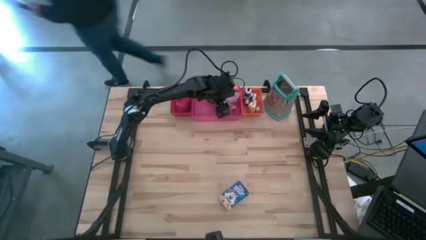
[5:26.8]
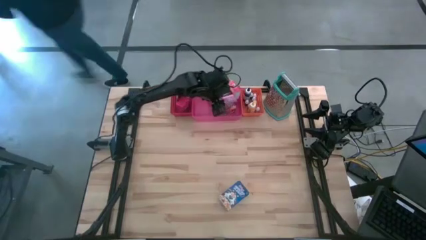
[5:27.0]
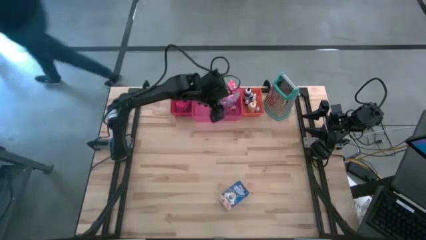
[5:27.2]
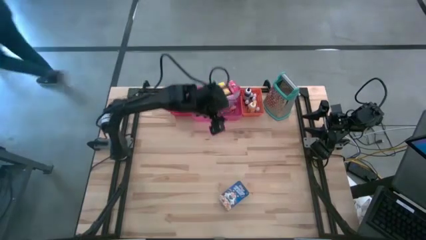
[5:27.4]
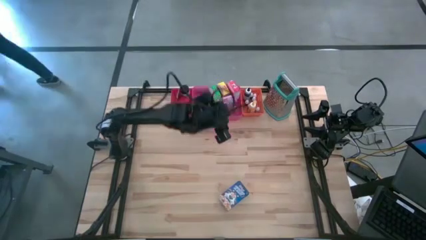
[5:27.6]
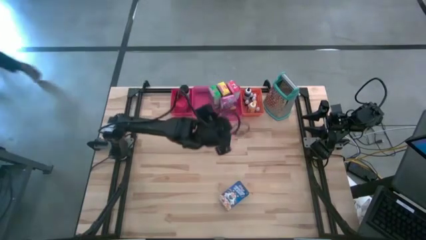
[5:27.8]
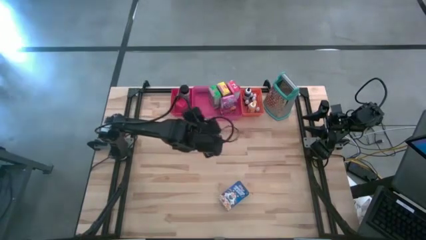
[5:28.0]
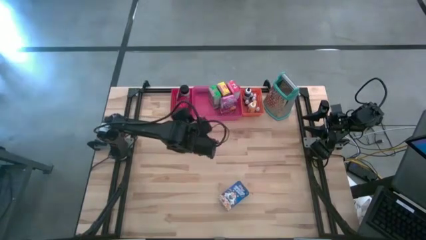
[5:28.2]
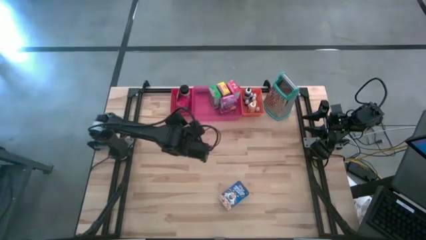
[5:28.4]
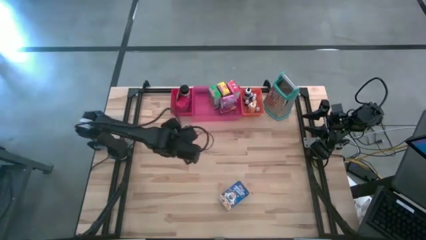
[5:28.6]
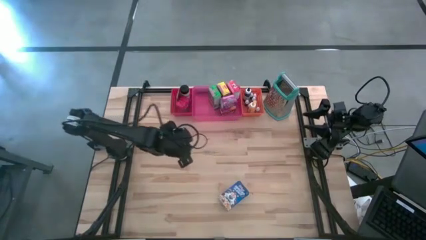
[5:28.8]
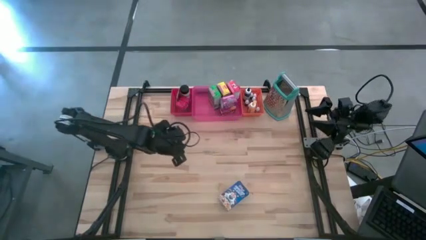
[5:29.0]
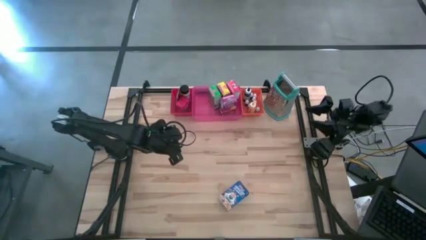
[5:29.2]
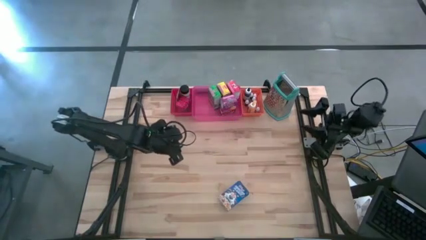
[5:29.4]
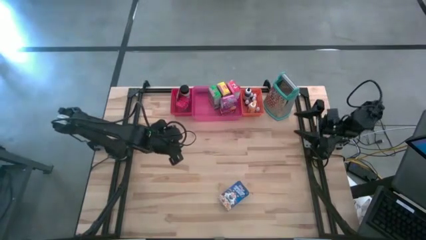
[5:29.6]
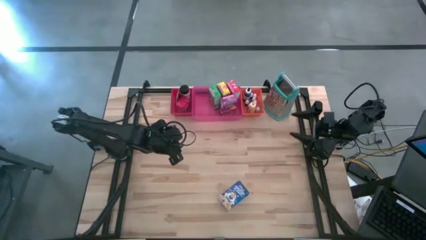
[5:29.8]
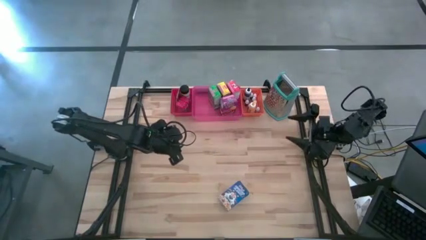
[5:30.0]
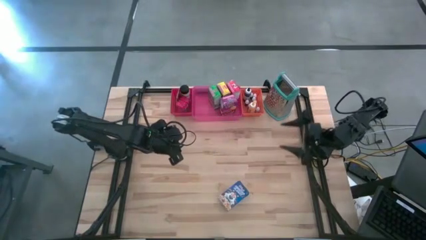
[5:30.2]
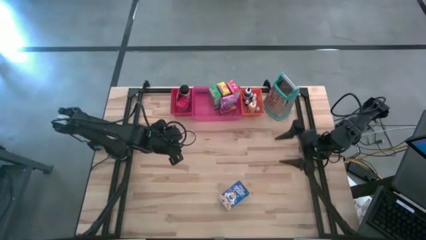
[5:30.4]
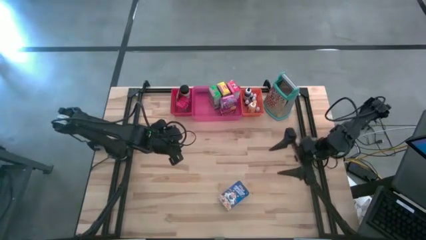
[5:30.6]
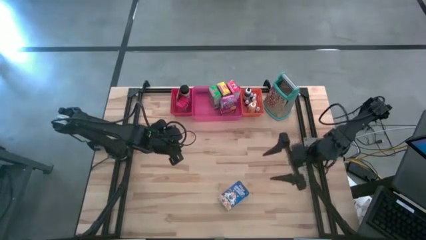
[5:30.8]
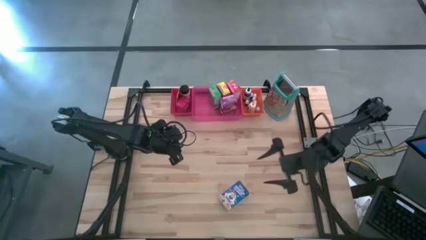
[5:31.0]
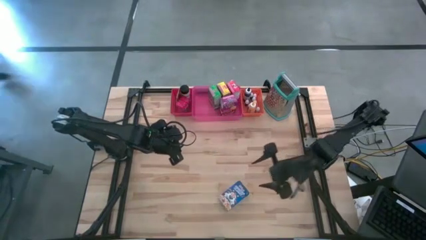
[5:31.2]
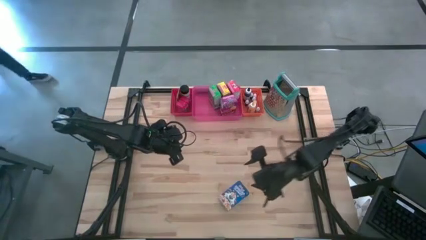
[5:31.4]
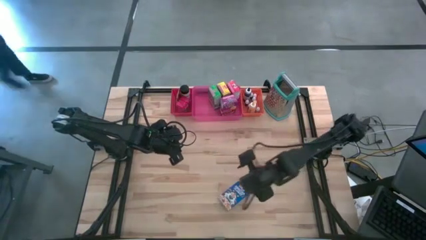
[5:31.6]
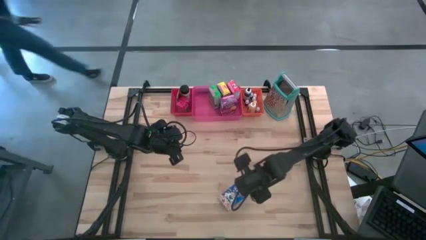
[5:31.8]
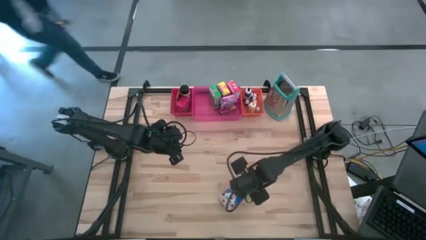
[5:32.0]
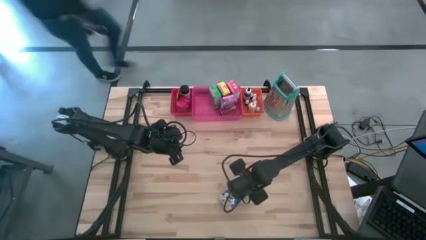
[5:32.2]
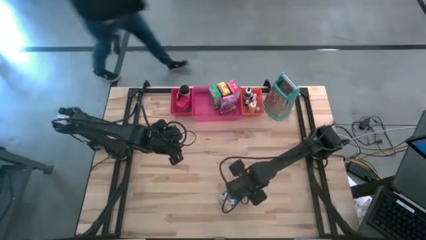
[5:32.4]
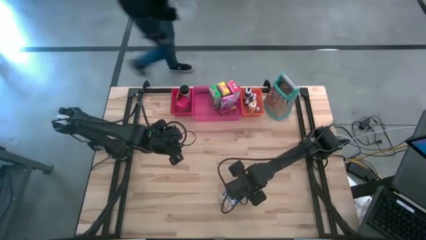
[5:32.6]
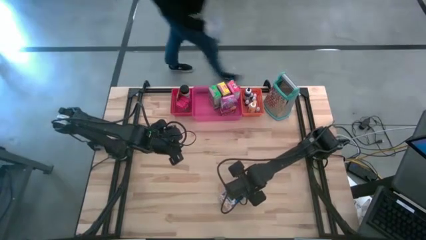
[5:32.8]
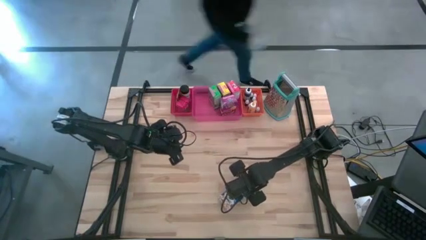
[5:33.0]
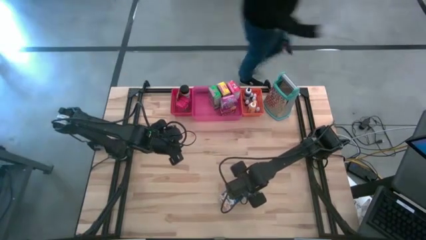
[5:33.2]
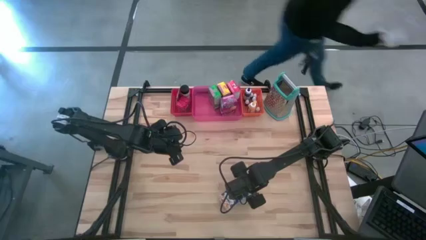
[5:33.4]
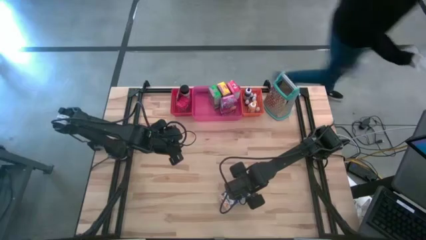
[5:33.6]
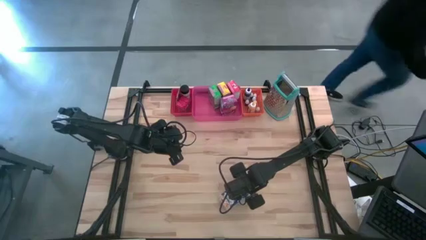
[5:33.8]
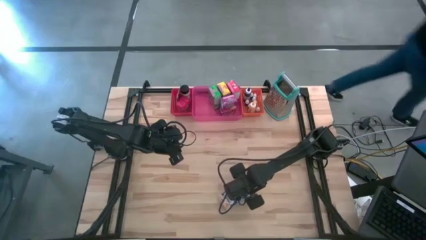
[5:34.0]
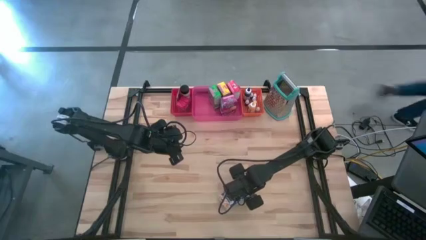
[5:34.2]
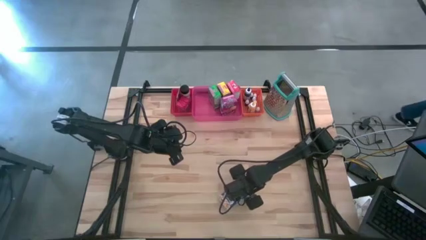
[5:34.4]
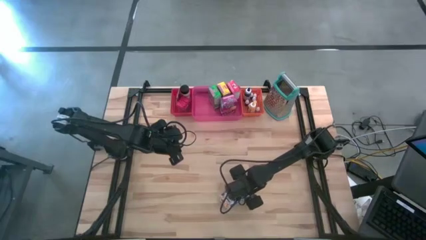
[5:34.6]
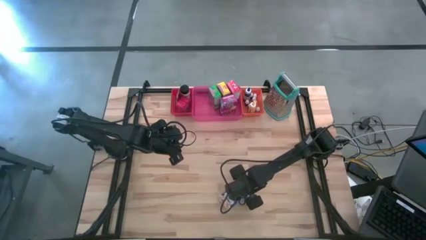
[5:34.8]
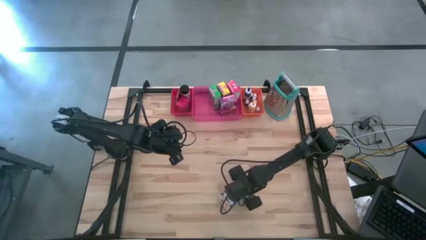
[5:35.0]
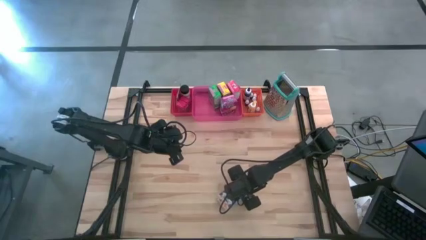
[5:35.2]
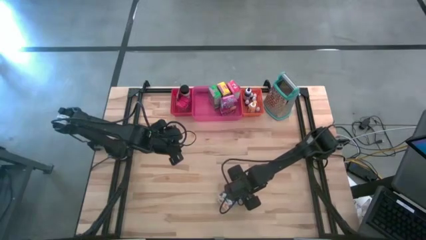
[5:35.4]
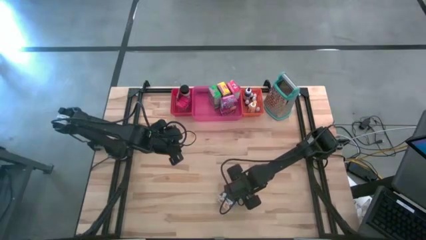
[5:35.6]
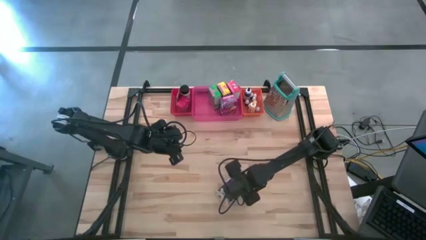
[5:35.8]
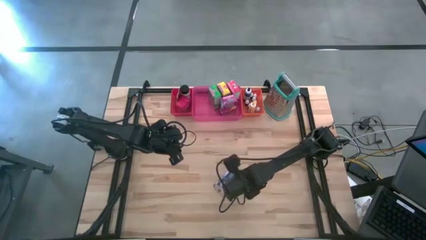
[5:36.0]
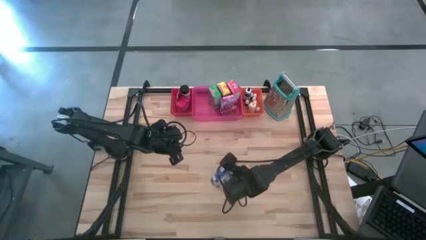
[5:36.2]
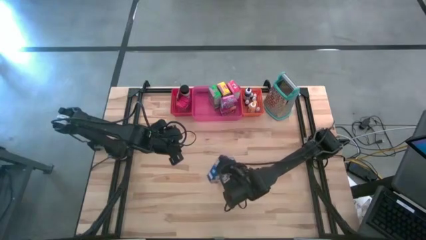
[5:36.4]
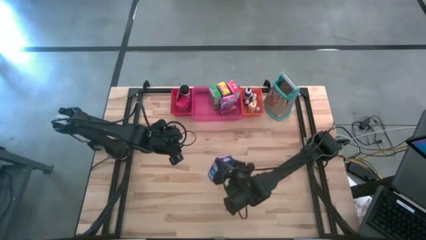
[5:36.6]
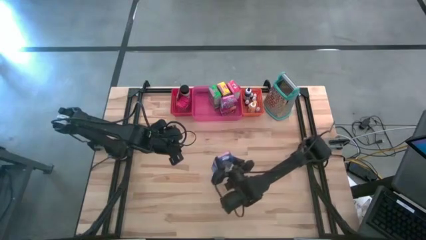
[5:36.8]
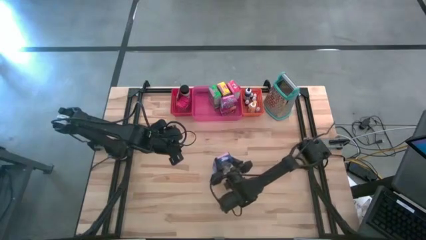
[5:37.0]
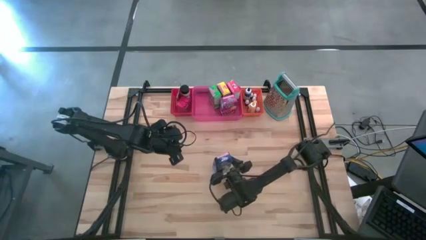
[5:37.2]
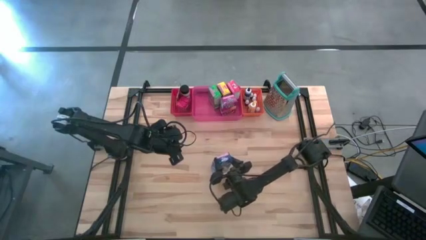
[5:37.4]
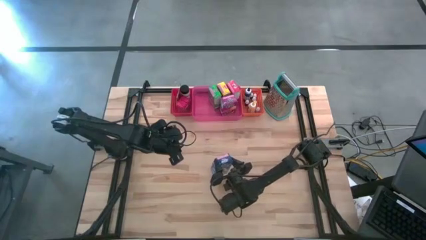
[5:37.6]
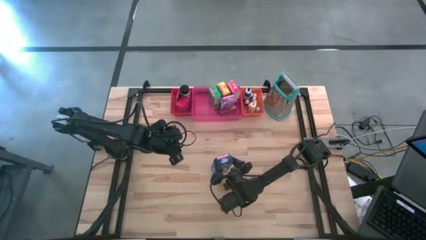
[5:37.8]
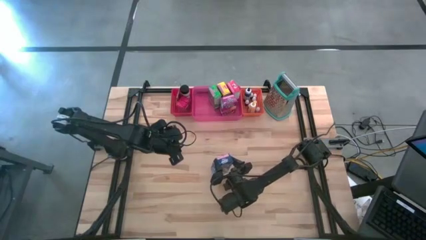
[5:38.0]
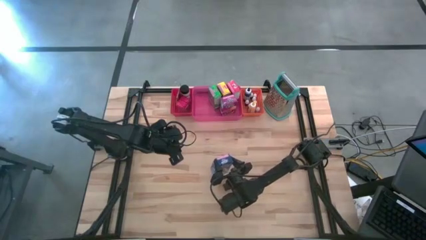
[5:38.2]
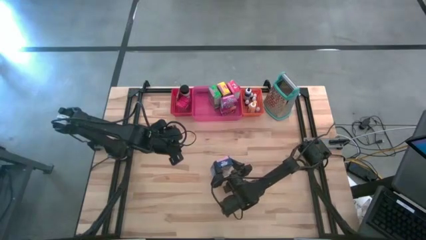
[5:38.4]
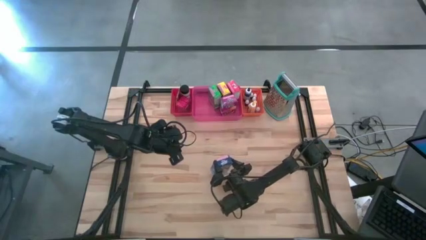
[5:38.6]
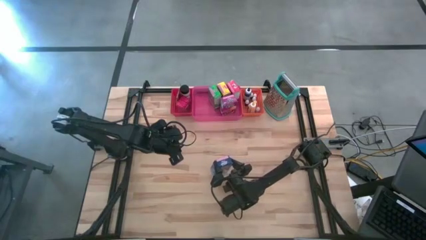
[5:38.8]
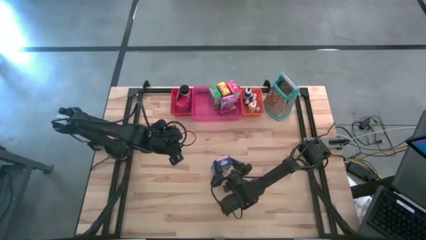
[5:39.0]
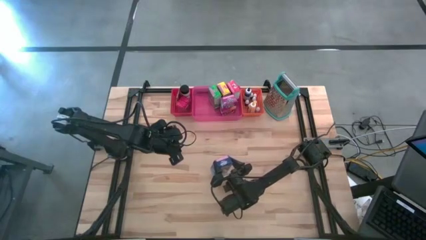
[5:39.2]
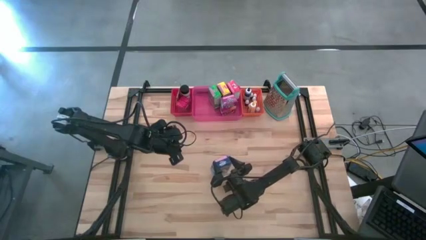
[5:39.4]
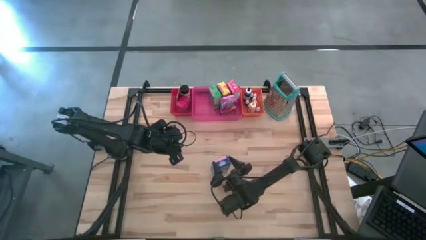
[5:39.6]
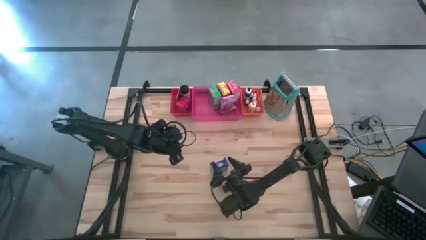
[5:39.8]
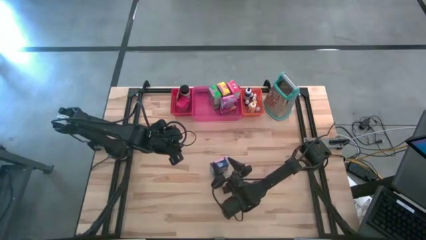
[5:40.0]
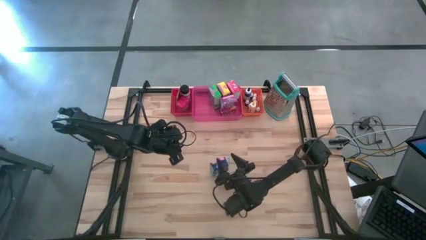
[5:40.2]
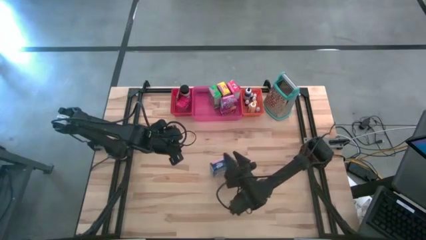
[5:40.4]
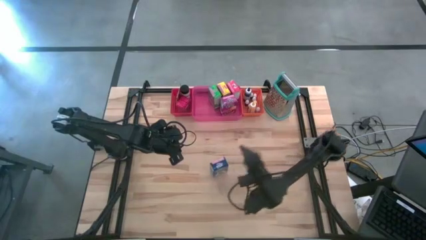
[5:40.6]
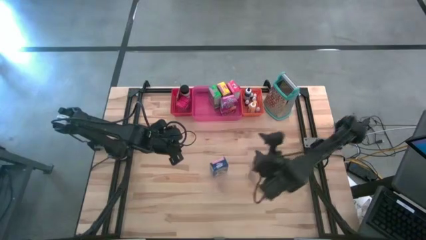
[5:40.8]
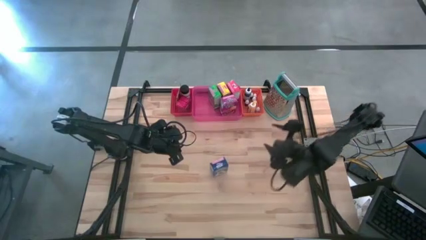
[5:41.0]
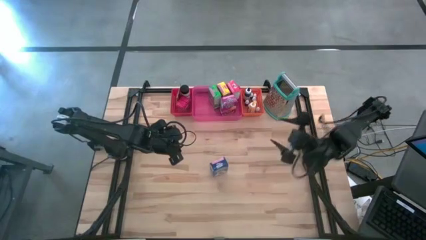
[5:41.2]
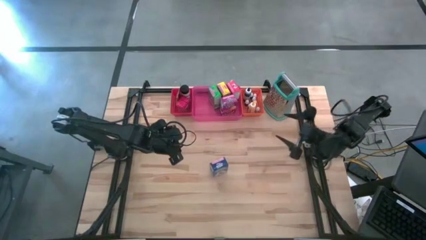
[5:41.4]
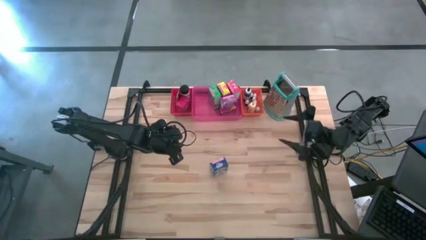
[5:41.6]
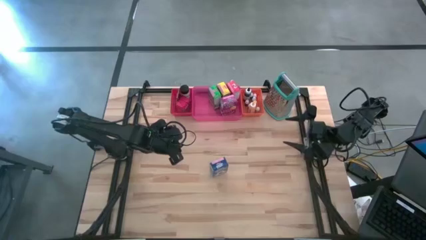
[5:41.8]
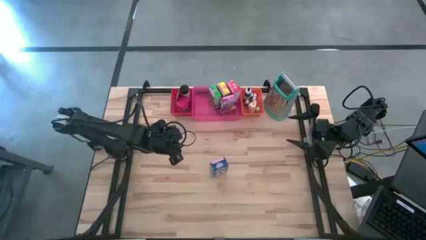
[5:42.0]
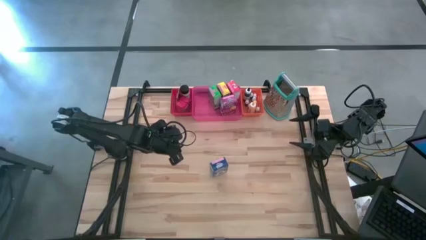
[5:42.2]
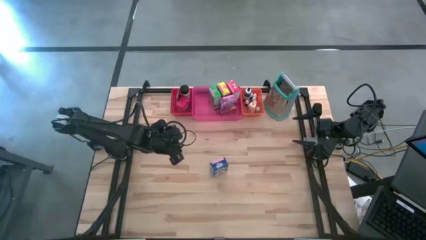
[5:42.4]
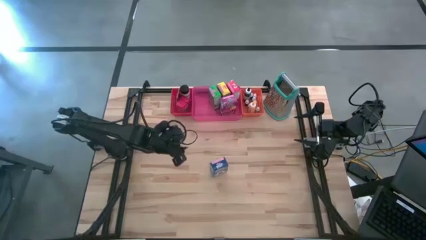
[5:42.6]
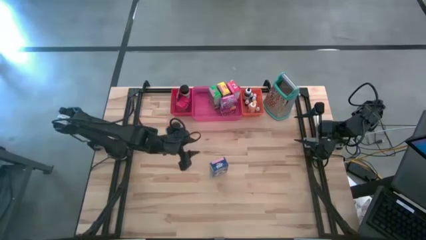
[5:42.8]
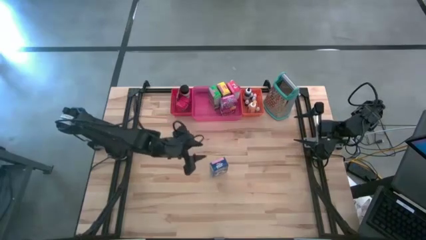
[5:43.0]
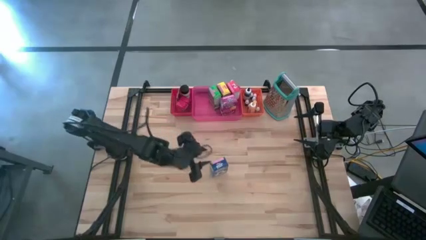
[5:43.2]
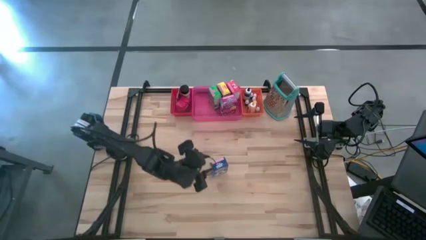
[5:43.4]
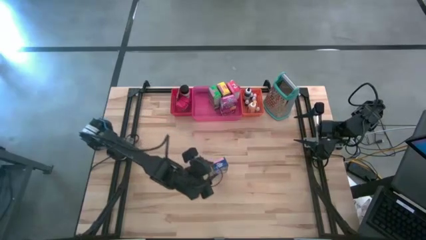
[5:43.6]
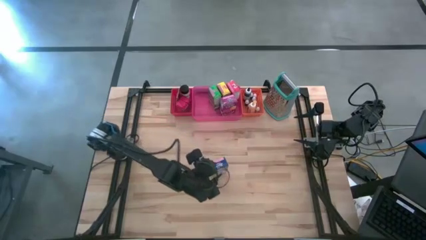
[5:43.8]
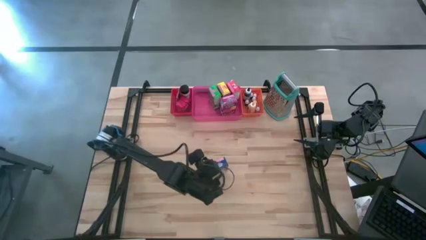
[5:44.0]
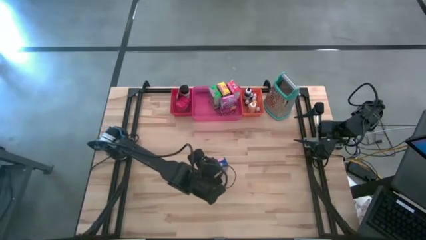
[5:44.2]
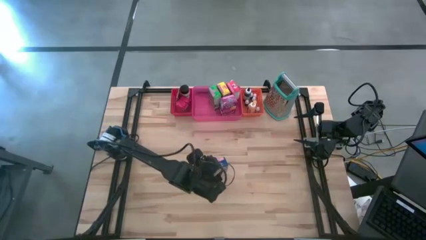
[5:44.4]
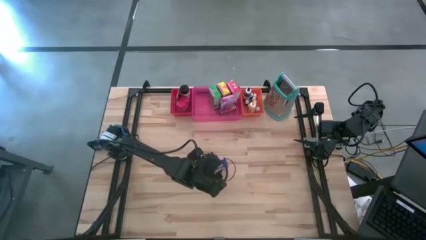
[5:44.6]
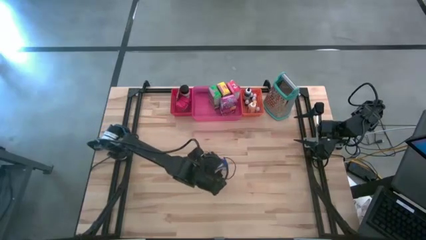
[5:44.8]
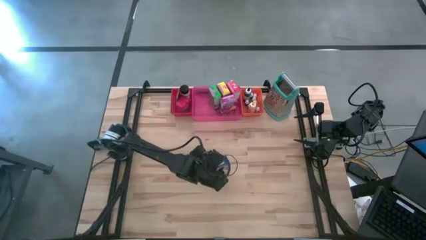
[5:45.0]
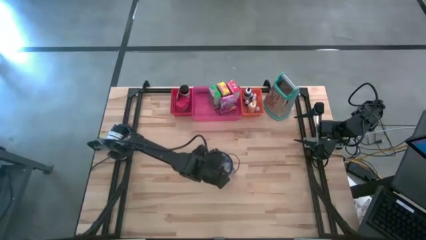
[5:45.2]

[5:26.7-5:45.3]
Task: Pick & Place Kitchen Items
Put the blue cereal box into the pink bin
